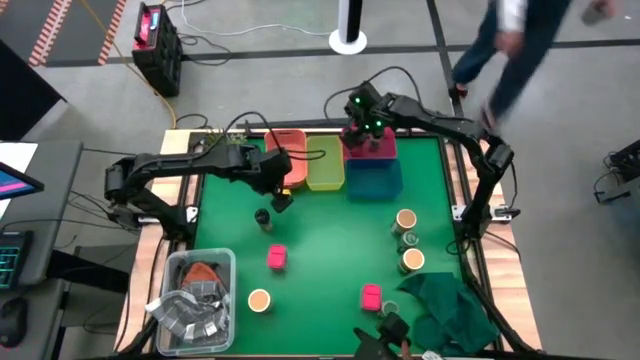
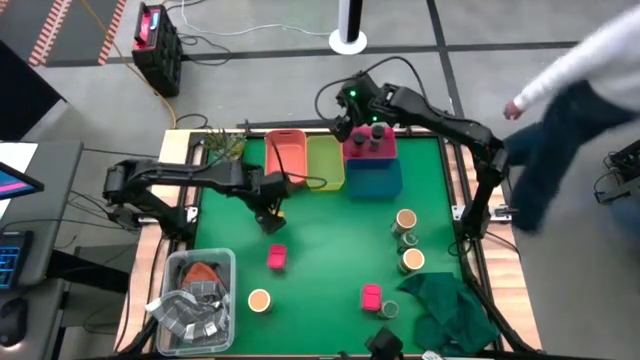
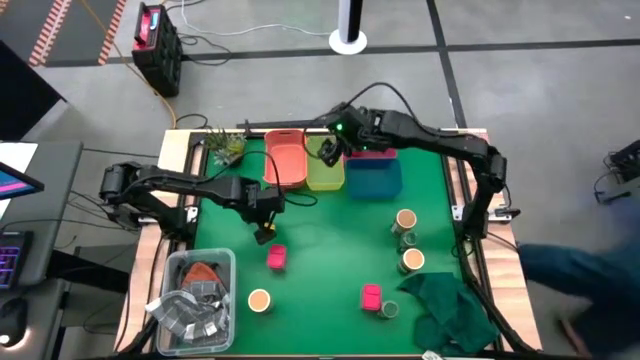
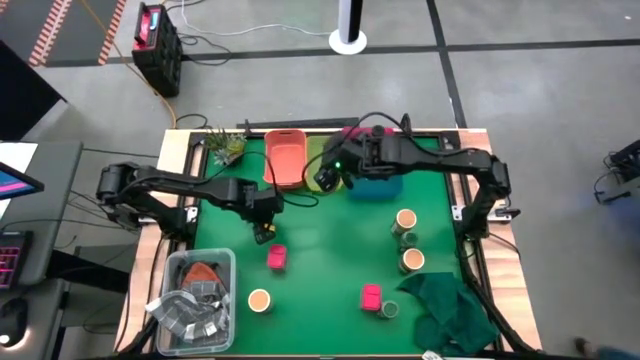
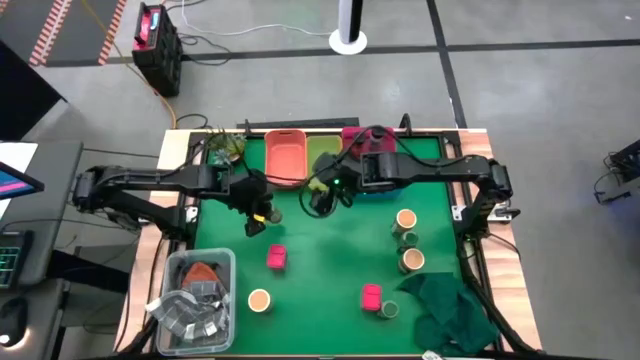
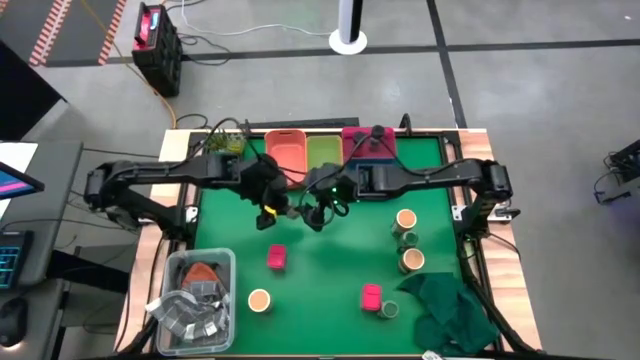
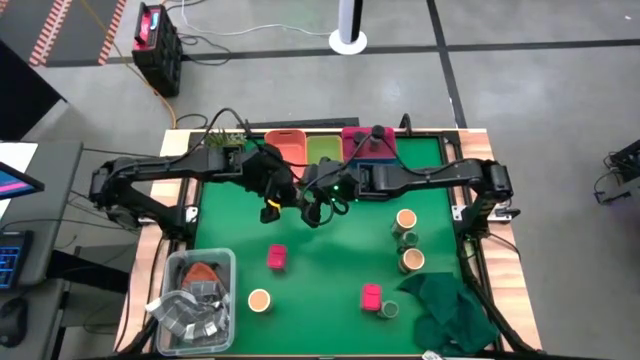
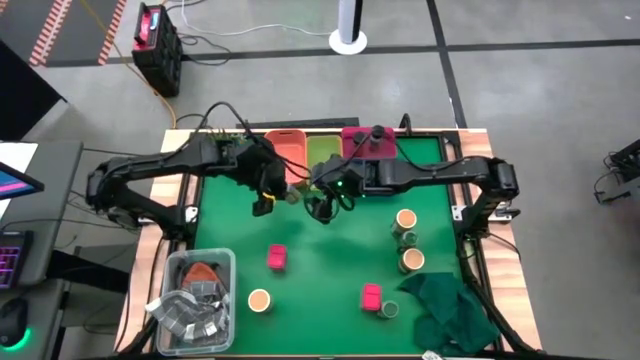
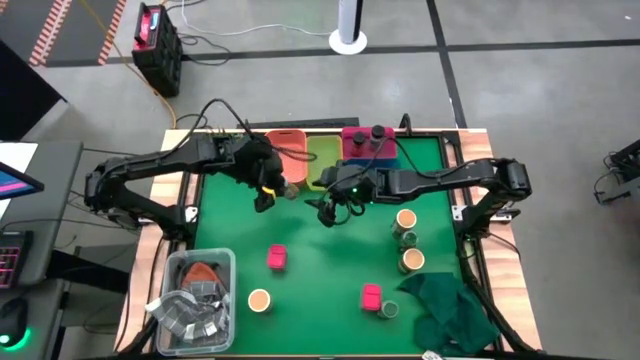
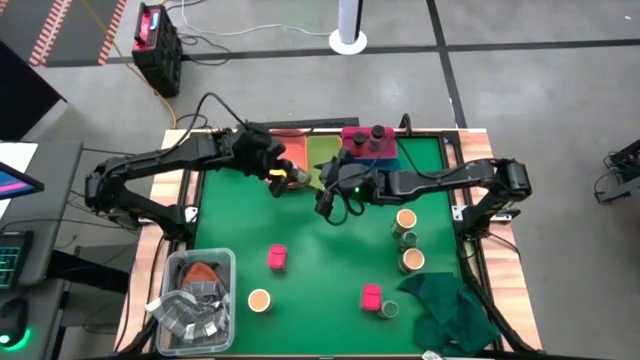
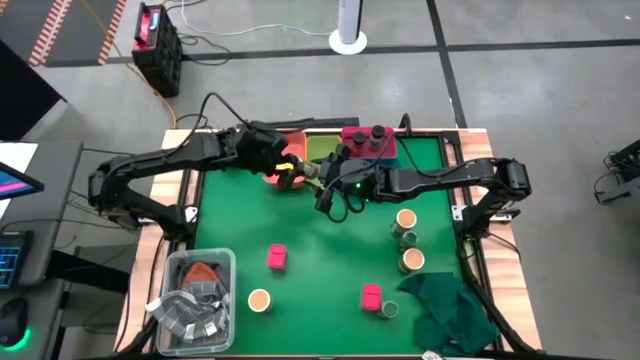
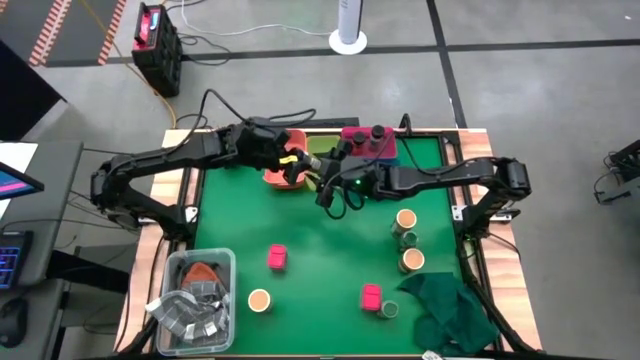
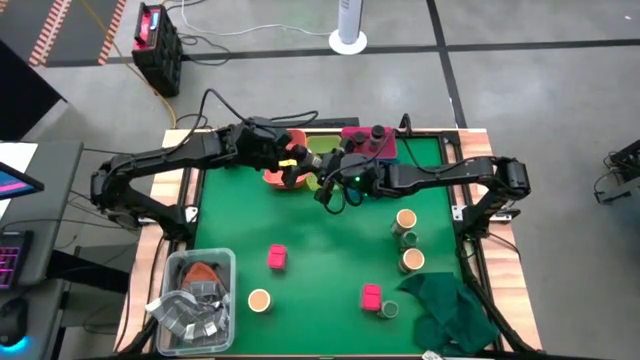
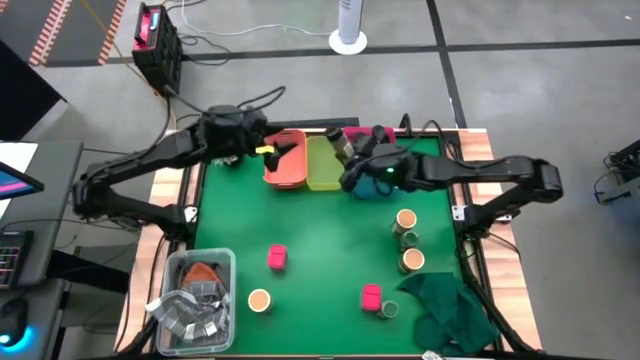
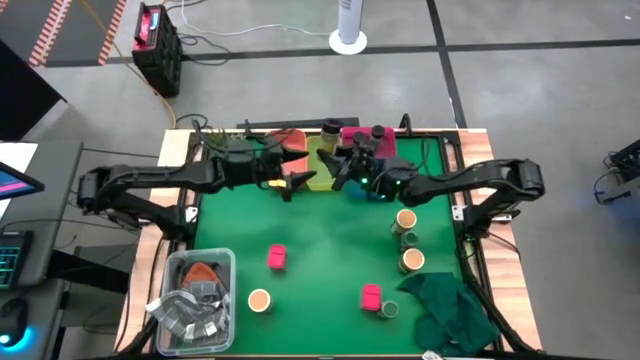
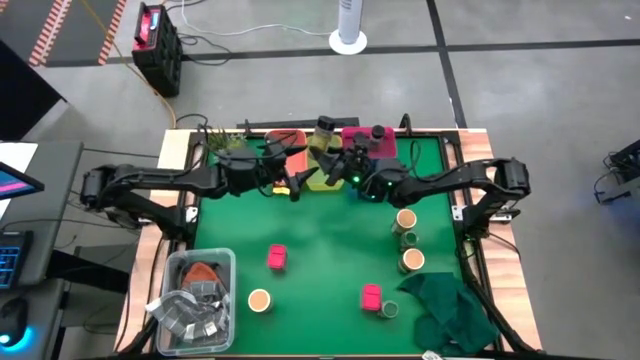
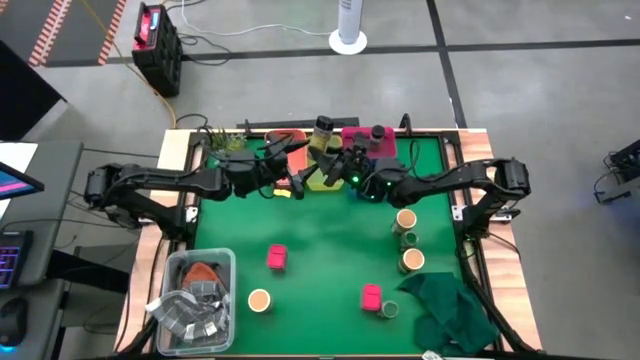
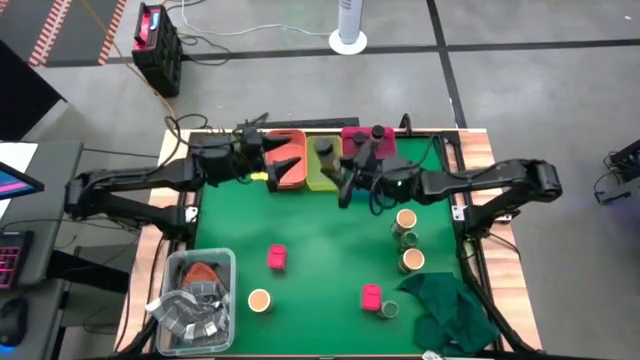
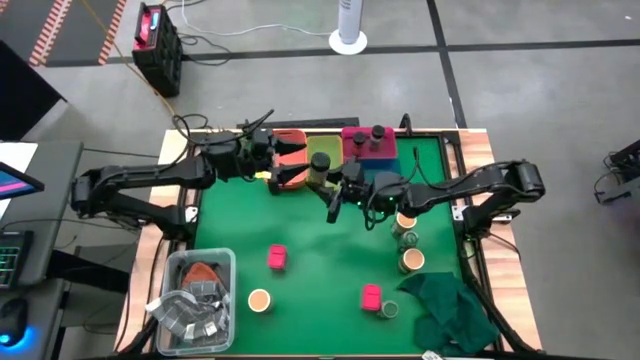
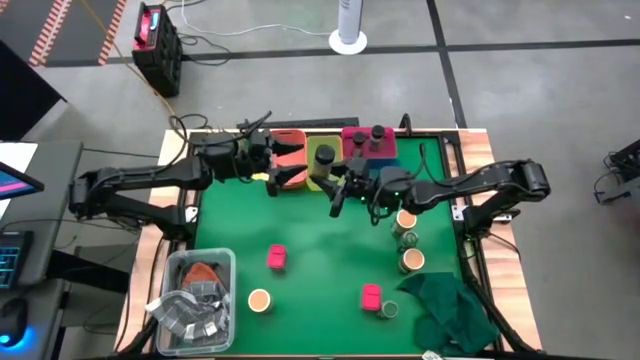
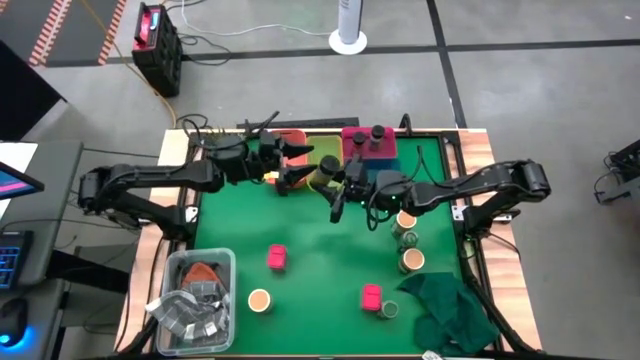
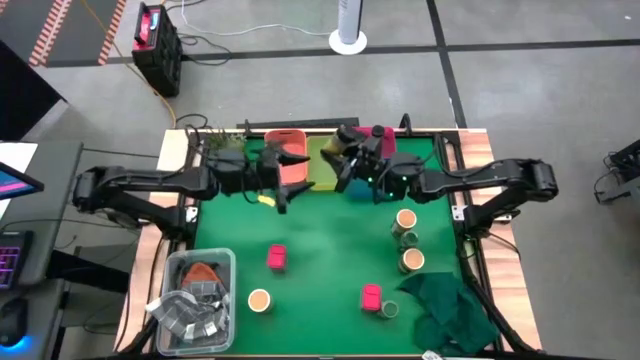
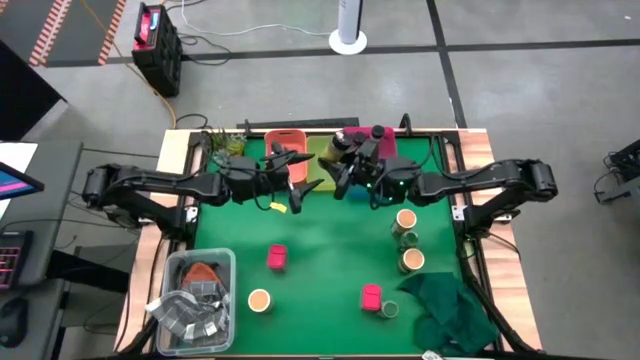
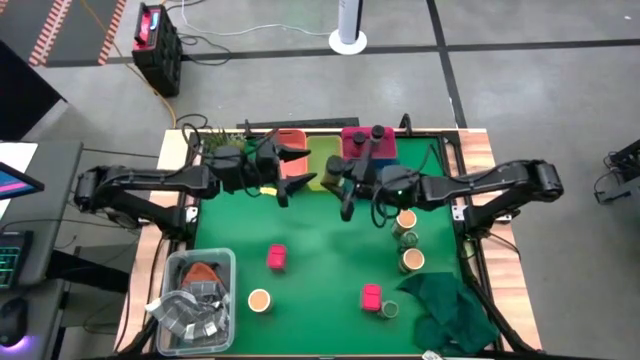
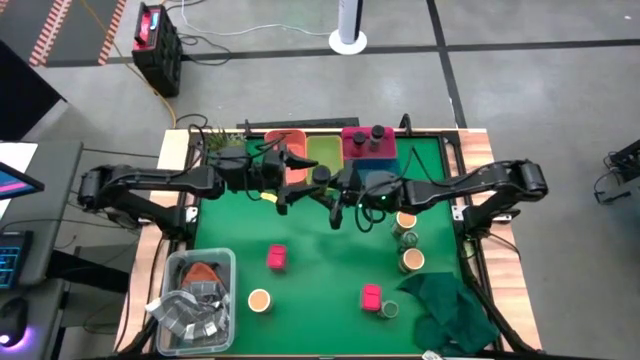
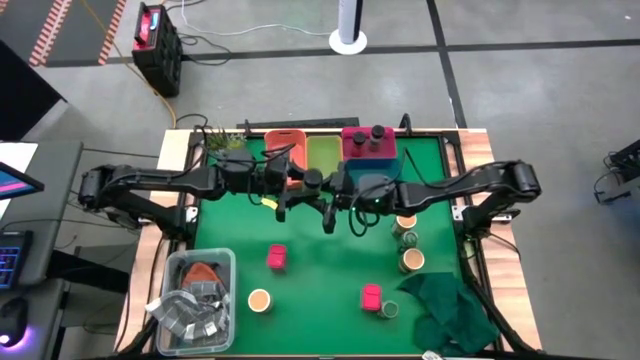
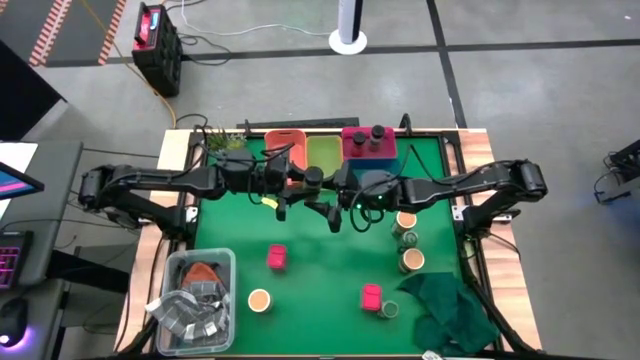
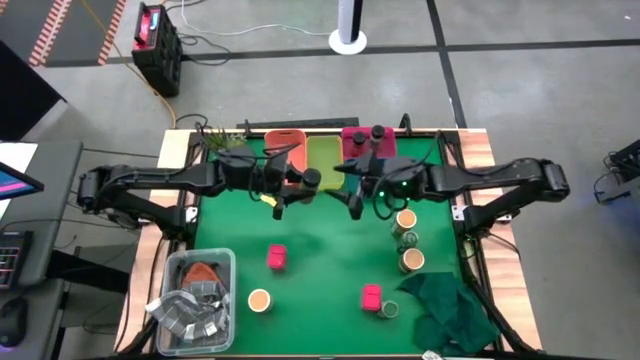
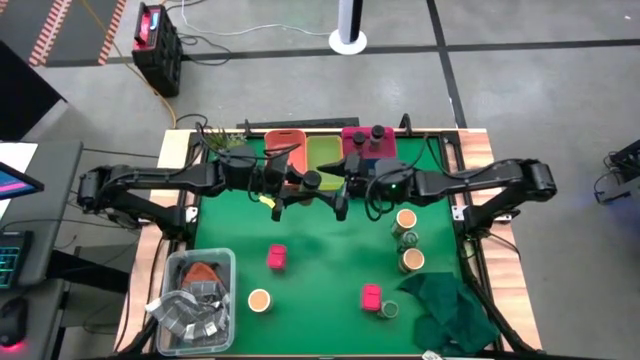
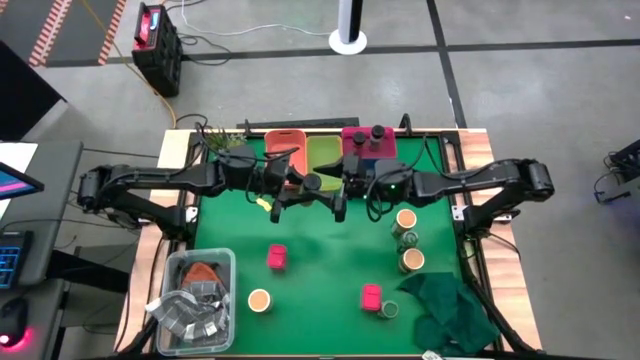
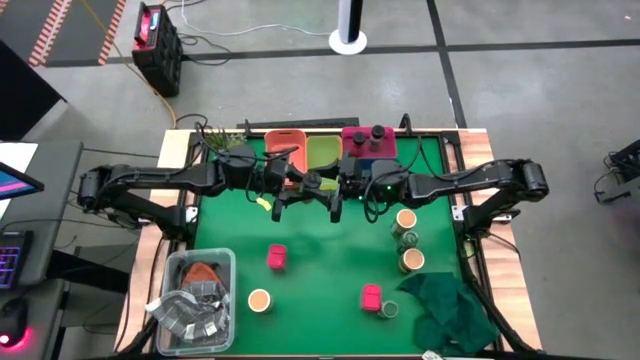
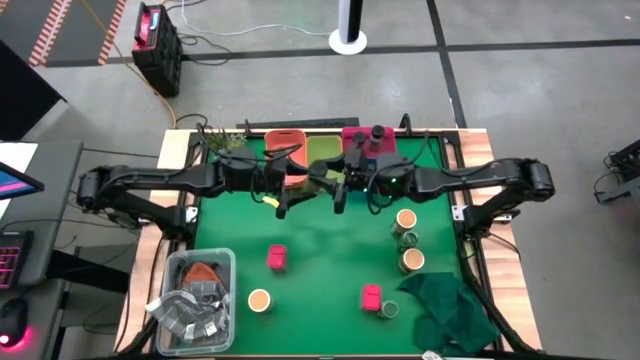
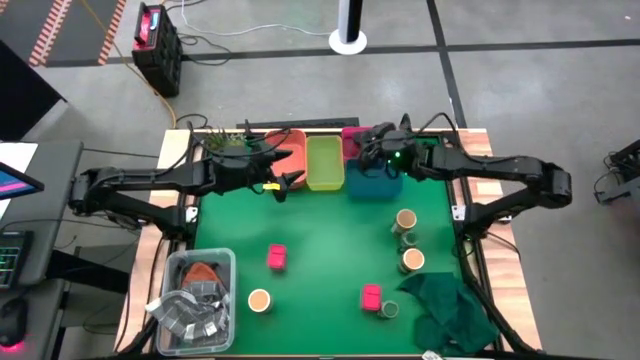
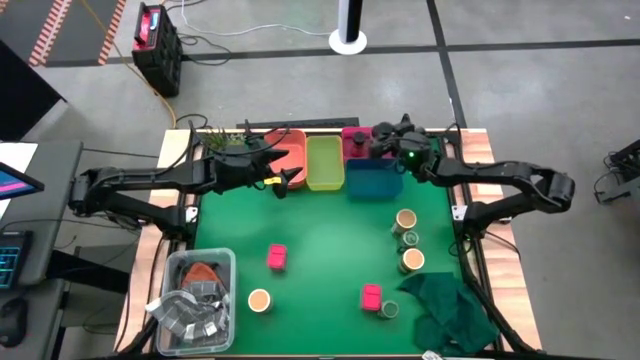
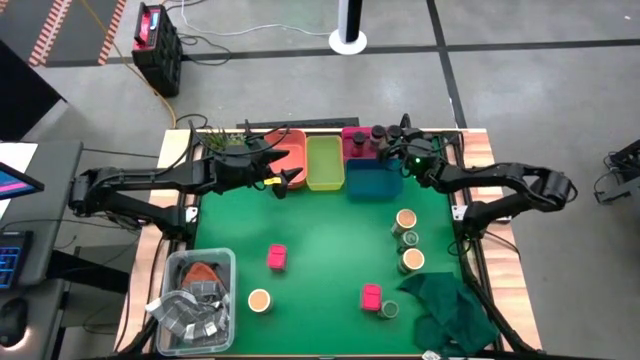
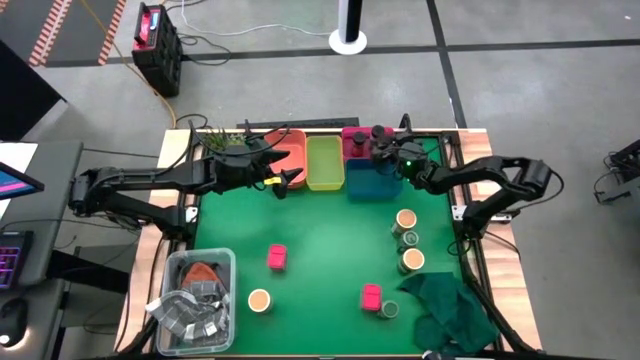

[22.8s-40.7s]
Task: Sort spices by type
Put the black seasoning bottle into the pink bin

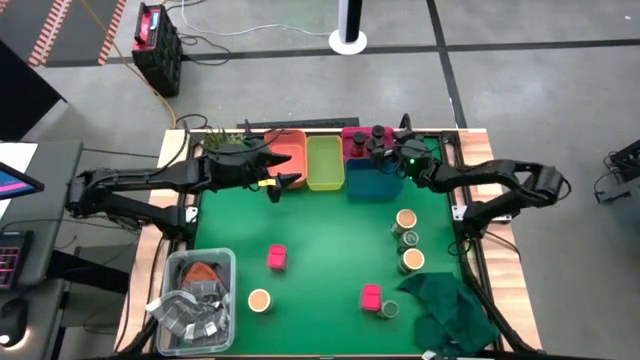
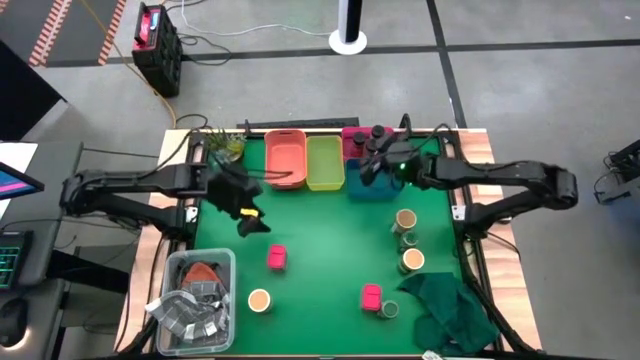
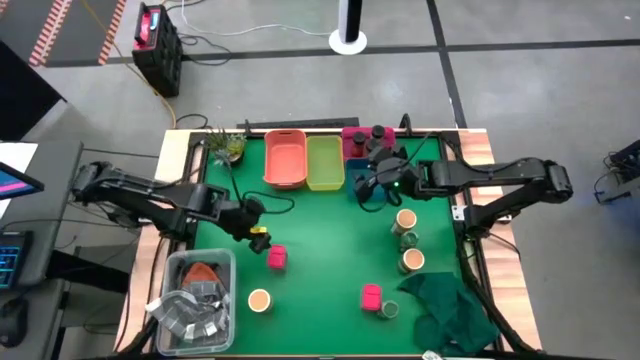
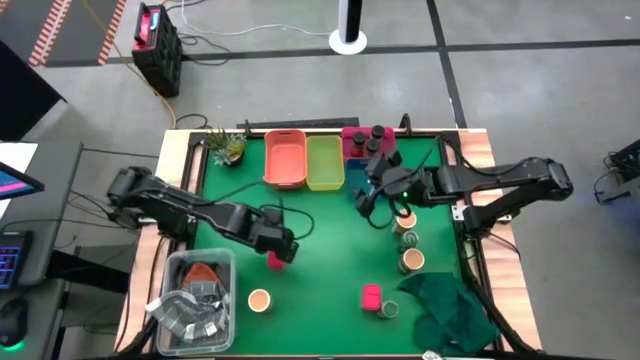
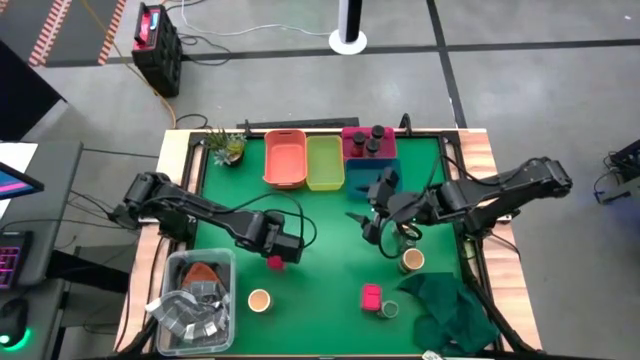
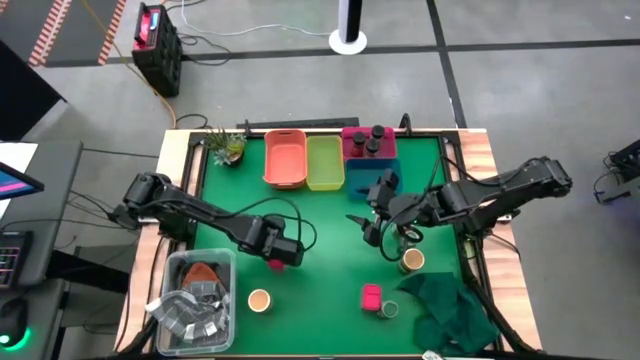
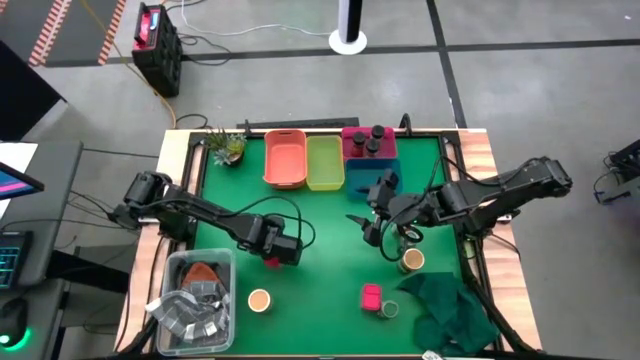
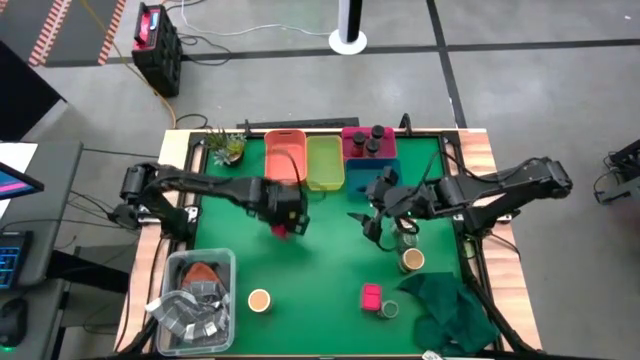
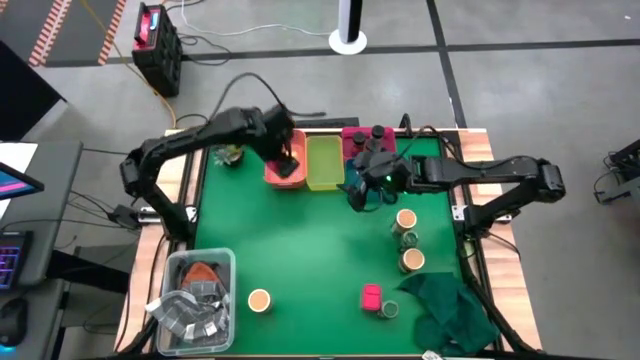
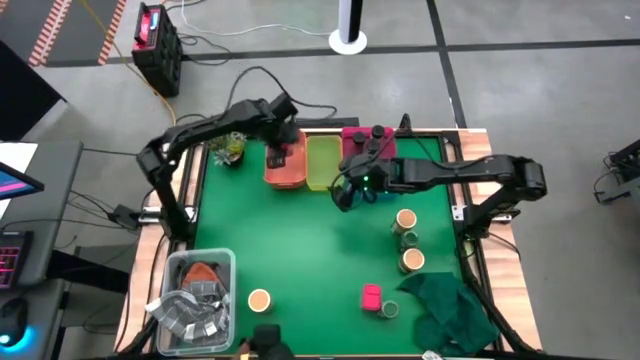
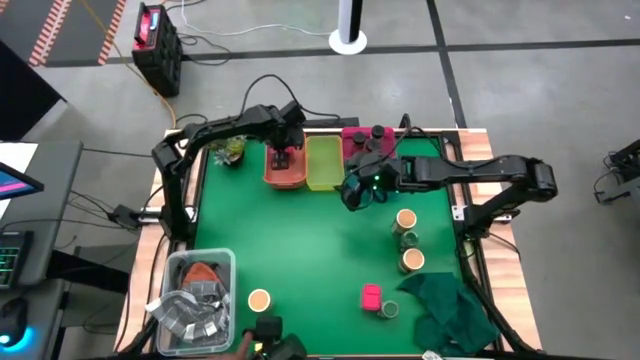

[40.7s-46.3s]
Put the top red seasoning can into the orange bin
